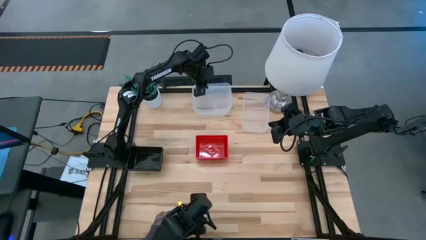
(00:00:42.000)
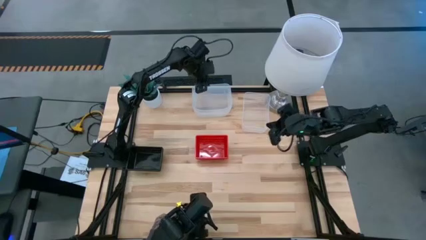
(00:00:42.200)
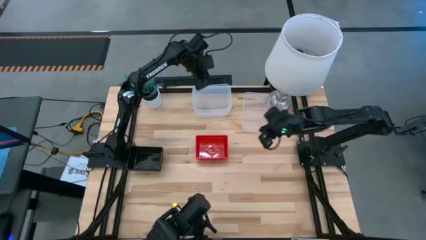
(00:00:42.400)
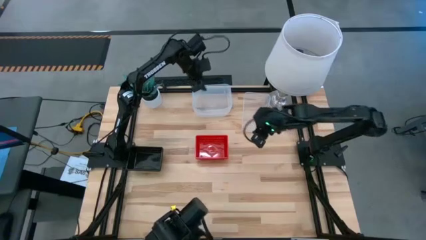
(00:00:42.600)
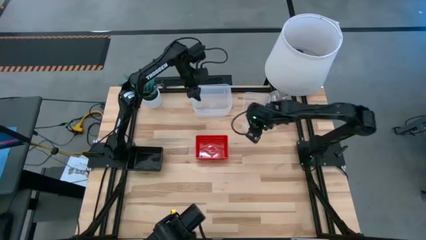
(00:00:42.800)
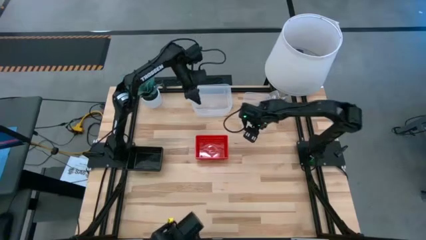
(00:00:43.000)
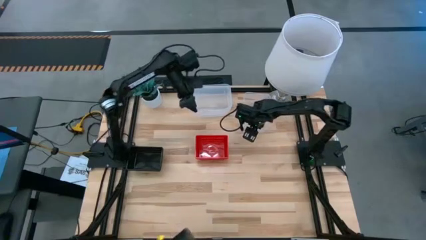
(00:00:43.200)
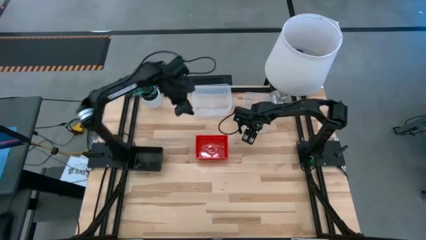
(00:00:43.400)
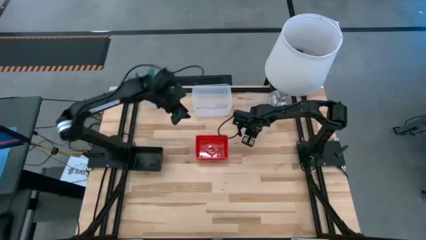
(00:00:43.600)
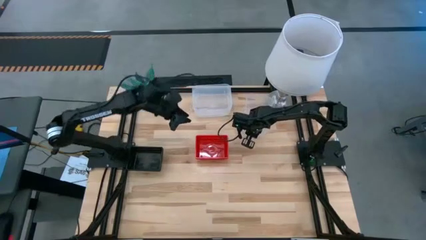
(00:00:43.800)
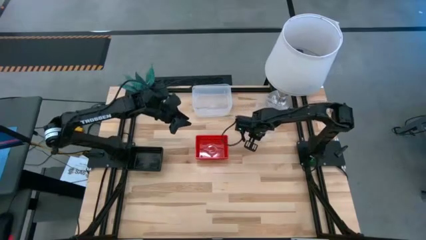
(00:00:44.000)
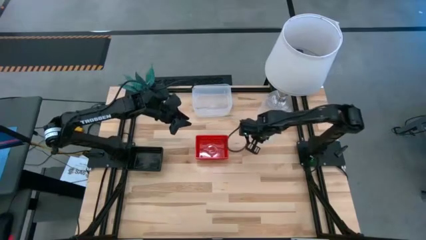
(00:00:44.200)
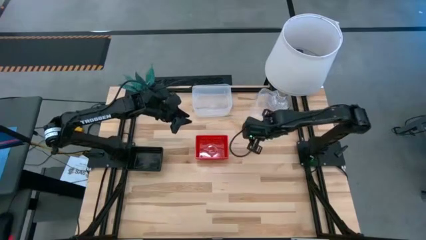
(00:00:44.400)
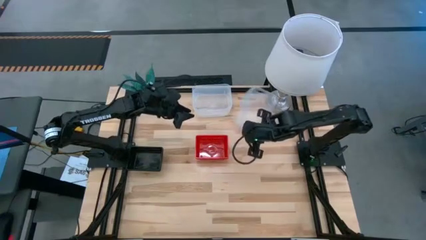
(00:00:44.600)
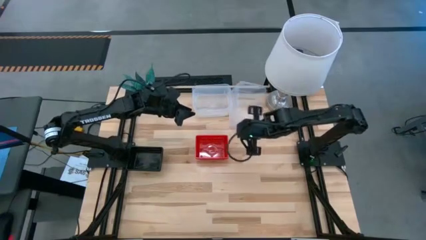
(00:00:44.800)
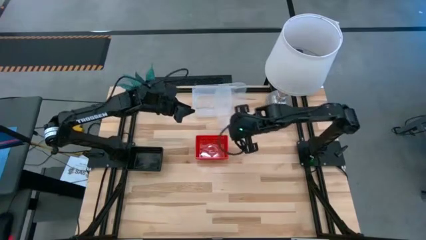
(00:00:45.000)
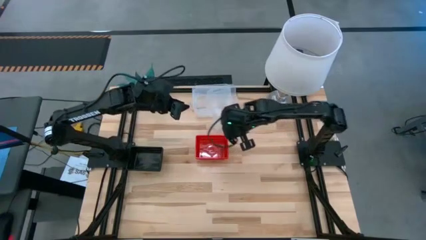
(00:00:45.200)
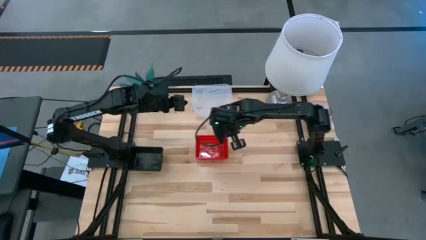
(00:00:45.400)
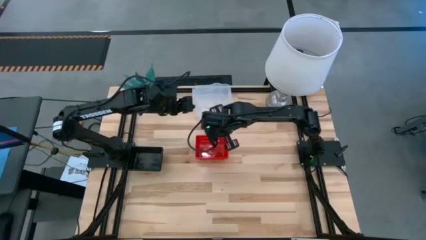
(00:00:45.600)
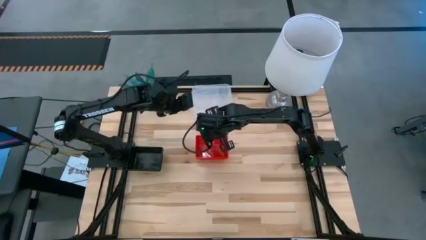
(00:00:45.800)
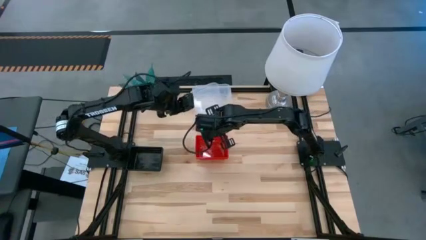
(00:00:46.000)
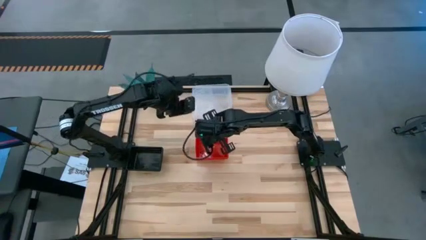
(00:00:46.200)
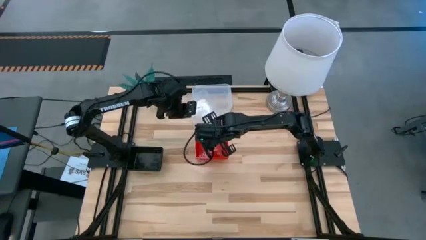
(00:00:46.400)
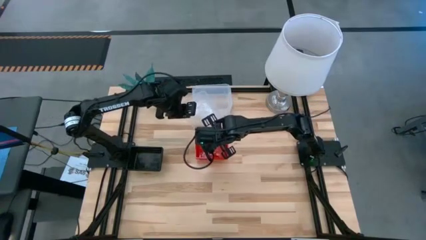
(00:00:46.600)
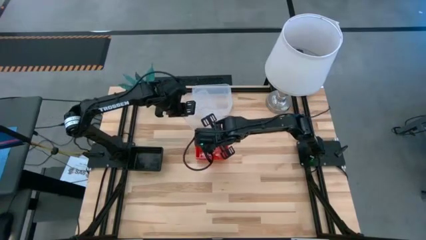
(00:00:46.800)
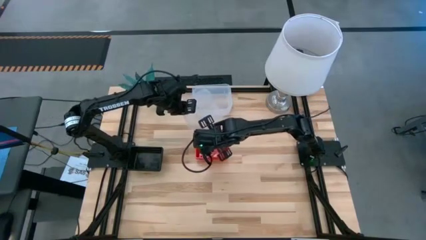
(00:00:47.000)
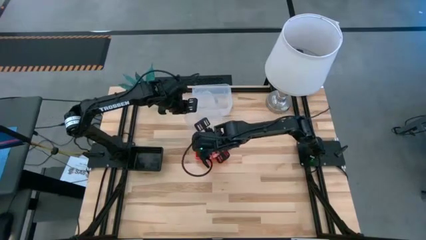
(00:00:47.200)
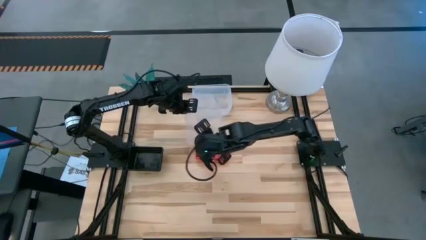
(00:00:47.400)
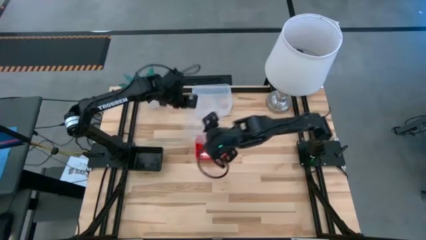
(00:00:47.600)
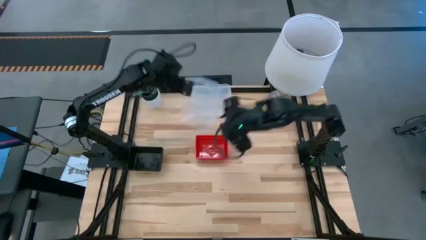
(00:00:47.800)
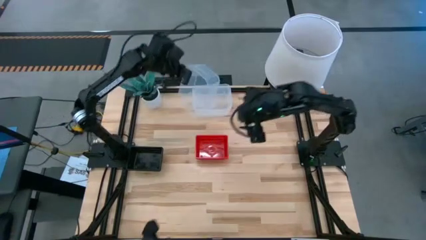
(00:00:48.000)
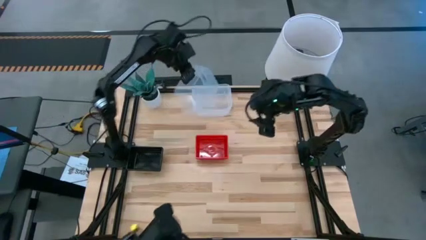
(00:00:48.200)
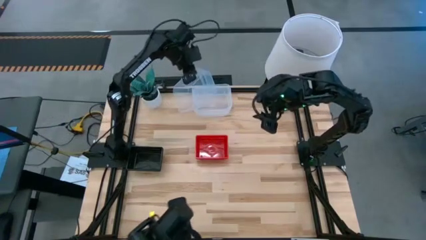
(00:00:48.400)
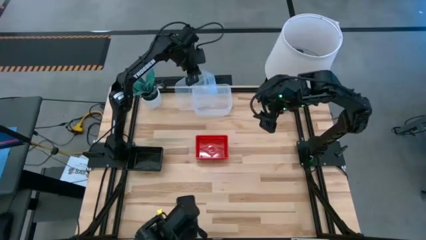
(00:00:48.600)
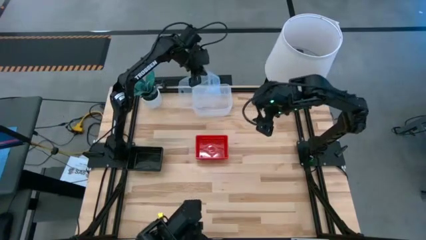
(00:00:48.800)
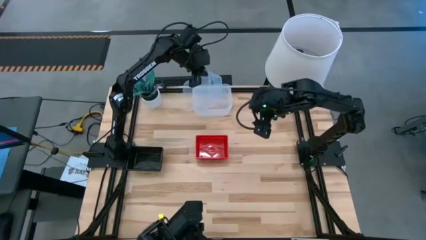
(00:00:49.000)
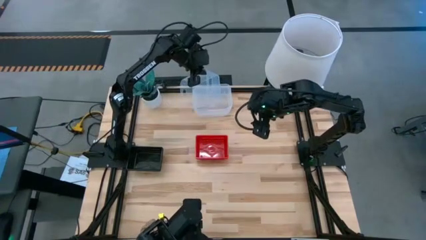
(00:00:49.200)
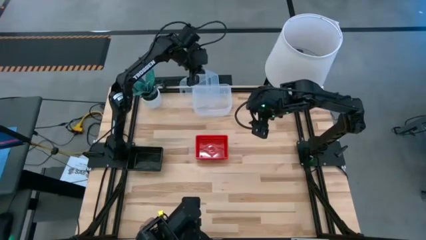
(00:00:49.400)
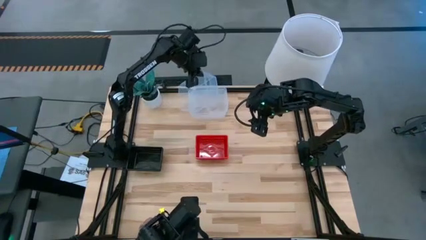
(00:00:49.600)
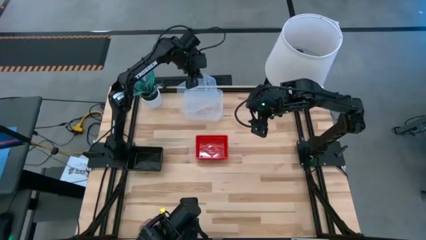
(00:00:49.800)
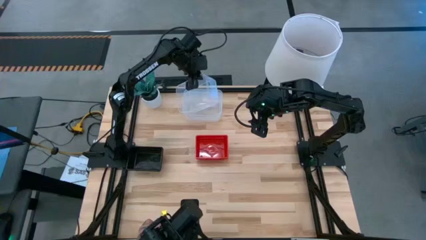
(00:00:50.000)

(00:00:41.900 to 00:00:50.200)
Stack the right transparent bin on the left transparent bin

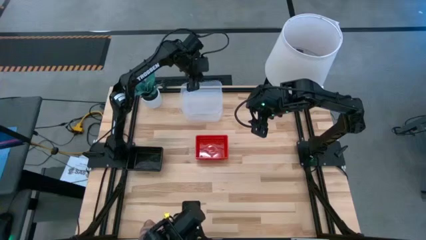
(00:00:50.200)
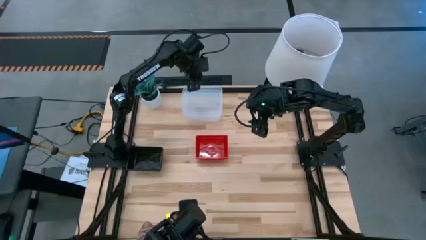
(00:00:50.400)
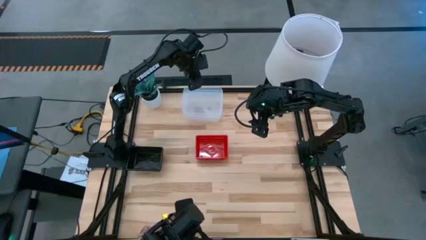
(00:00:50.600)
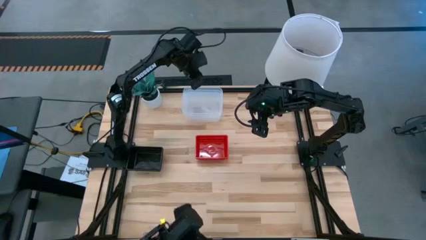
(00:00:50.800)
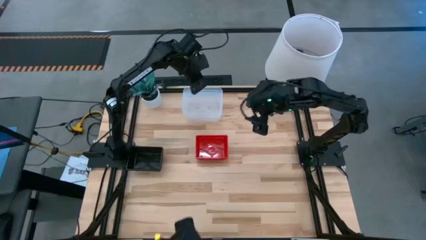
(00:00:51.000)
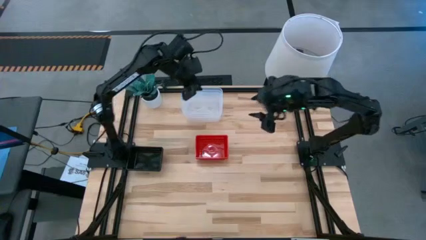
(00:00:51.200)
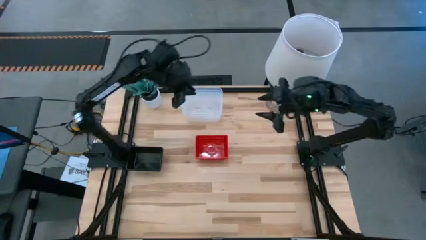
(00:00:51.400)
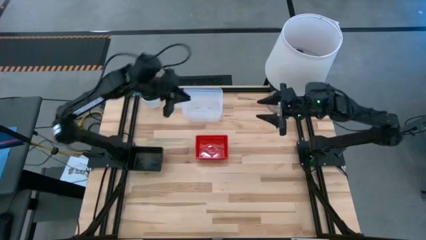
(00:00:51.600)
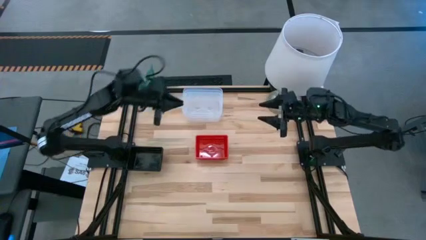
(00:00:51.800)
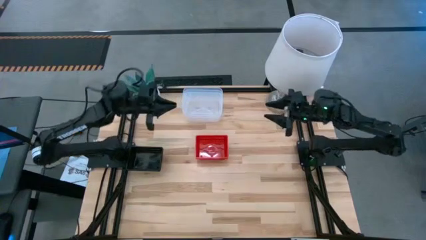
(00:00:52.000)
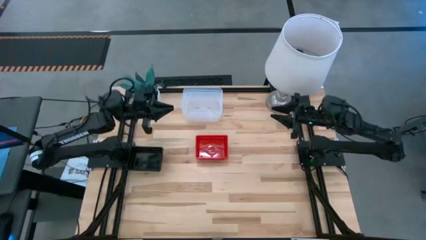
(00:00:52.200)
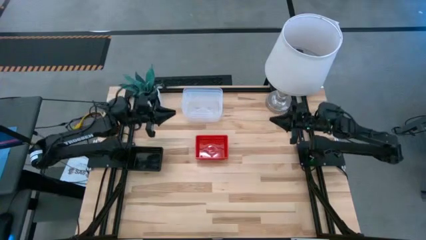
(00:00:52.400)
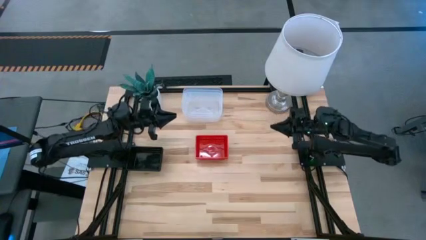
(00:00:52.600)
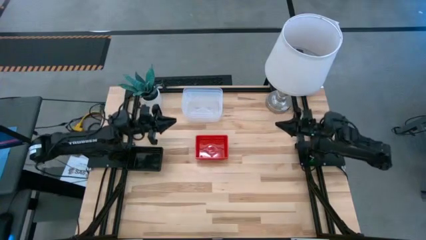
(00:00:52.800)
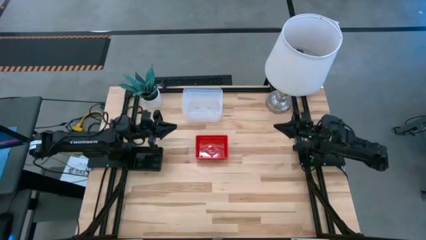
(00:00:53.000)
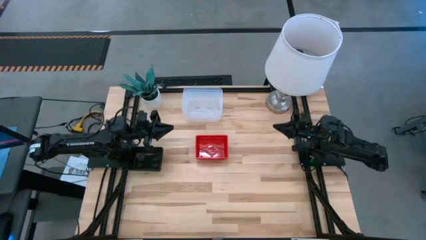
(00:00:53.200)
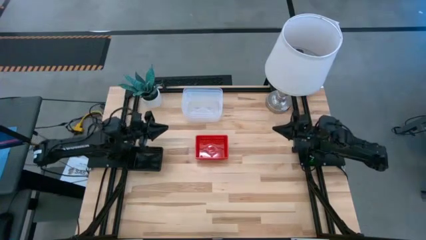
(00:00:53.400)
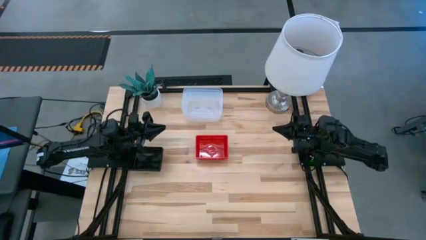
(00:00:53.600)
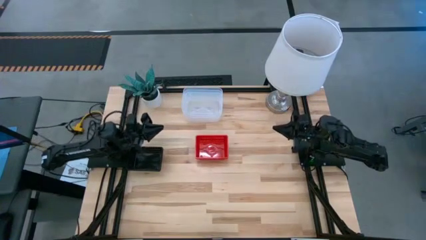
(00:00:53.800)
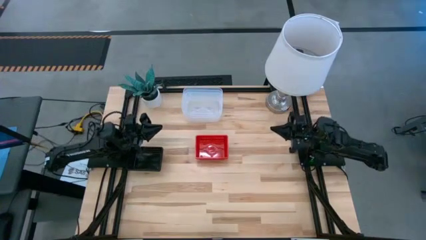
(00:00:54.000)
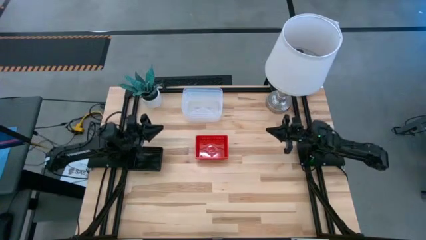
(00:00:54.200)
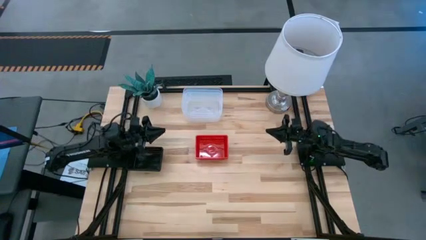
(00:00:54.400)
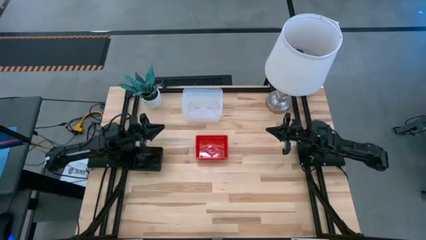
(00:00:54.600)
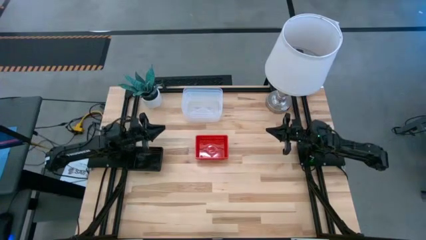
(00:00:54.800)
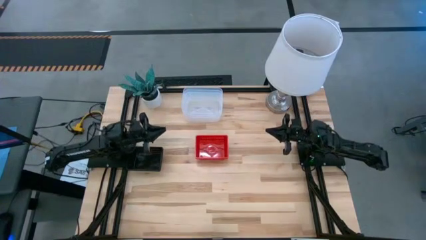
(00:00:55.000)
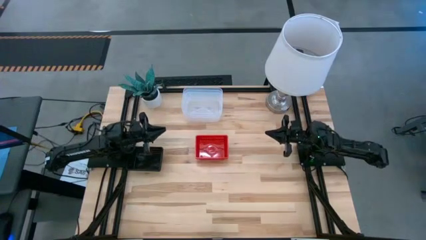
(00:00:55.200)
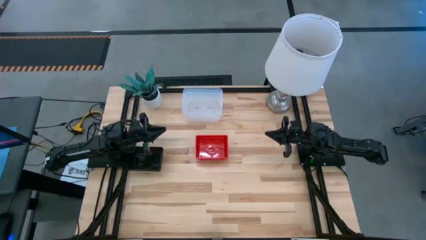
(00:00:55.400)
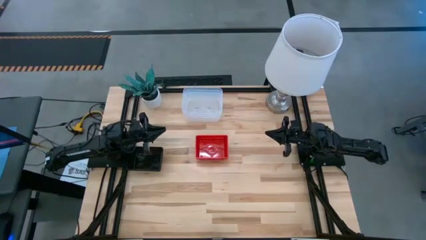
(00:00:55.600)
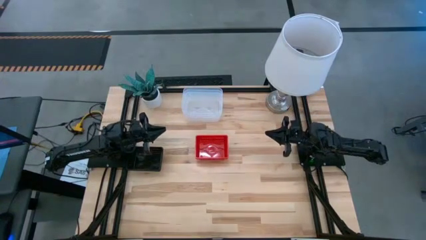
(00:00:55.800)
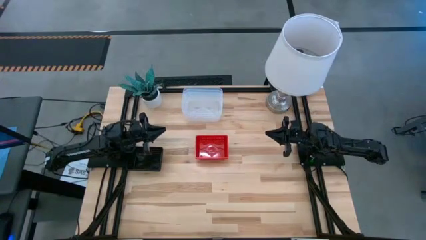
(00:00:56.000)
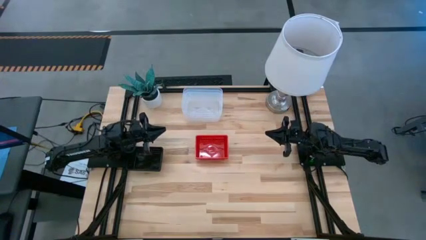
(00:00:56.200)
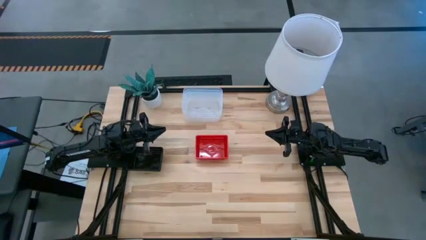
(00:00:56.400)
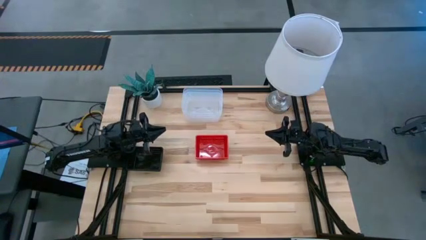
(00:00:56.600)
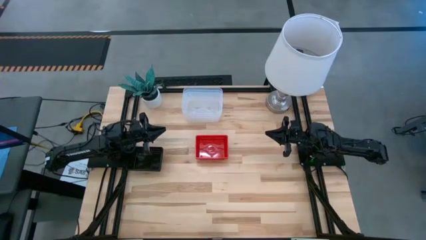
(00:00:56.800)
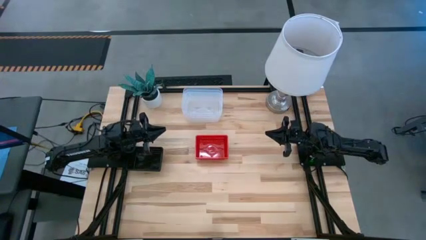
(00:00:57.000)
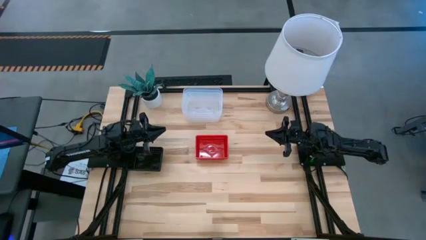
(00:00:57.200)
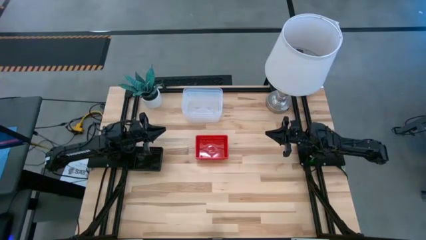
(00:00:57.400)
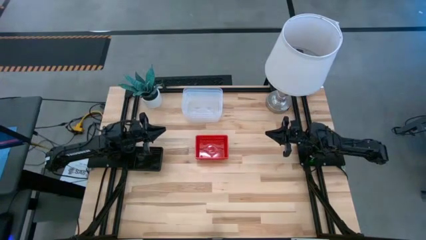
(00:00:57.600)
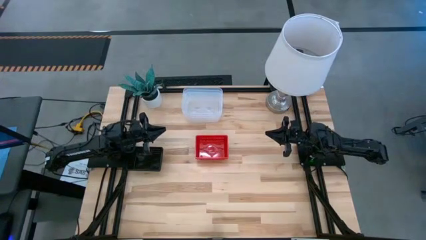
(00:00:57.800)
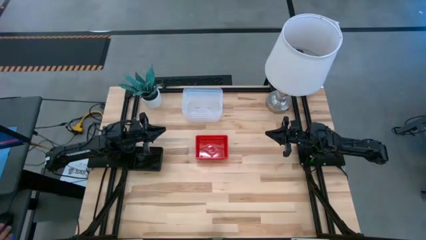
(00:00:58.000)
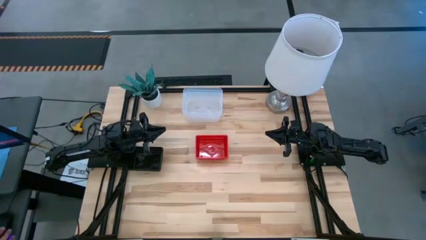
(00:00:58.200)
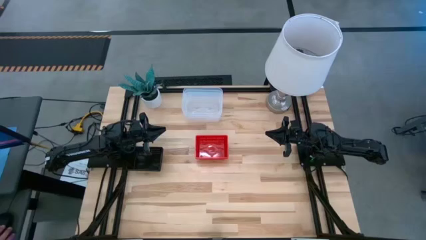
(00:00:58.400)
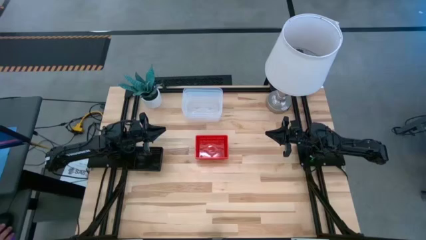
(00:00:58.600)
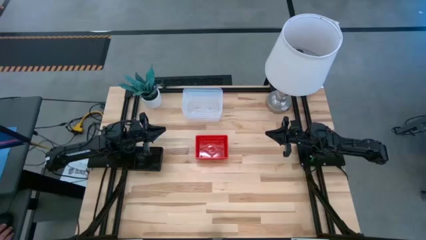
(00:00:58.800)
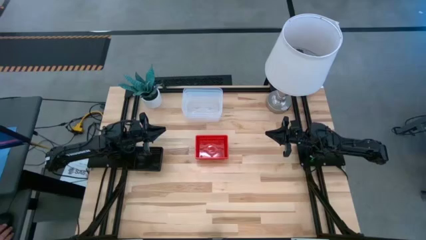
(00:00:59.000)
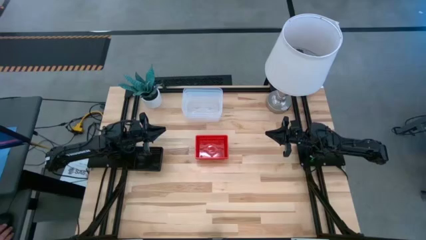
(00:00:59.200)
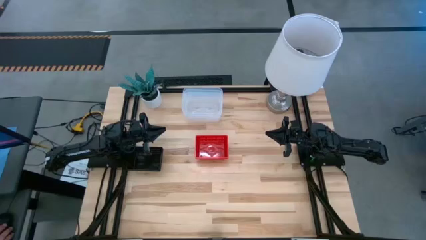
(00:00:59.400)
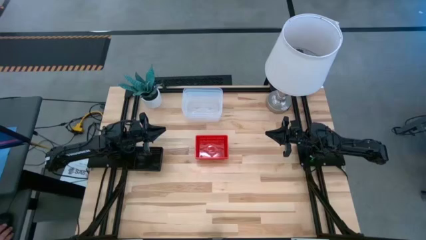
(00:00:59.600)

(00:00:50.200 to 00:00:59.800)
Return to Home Position
